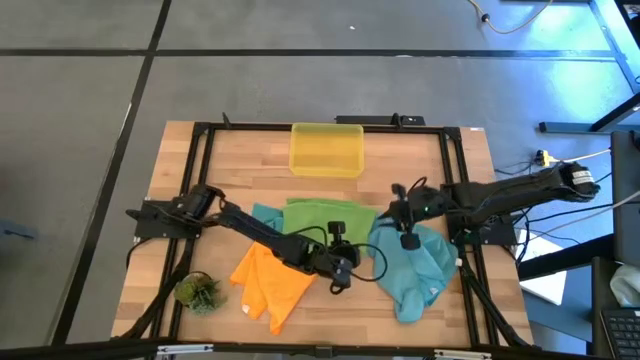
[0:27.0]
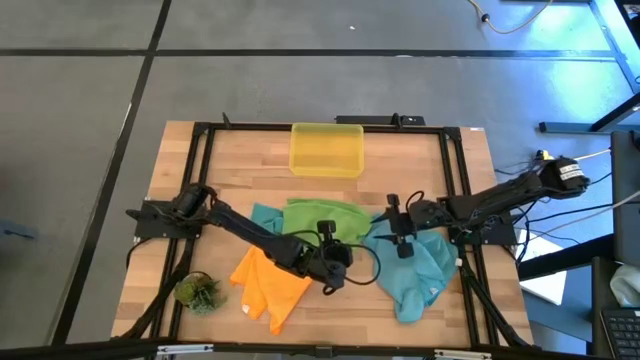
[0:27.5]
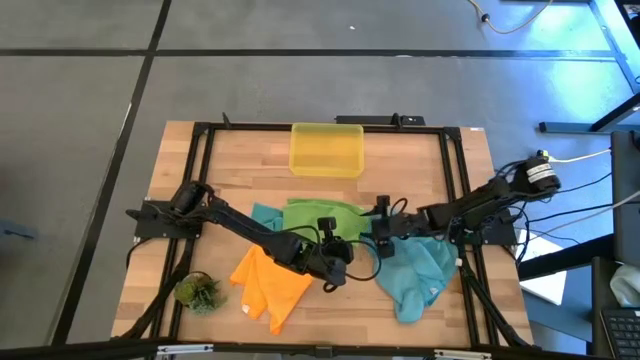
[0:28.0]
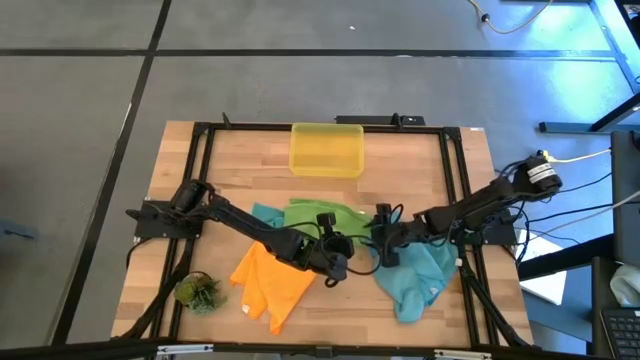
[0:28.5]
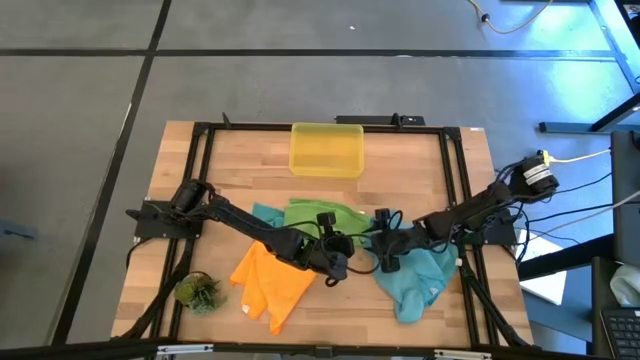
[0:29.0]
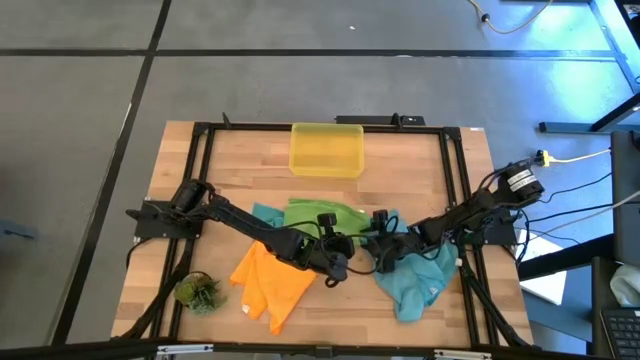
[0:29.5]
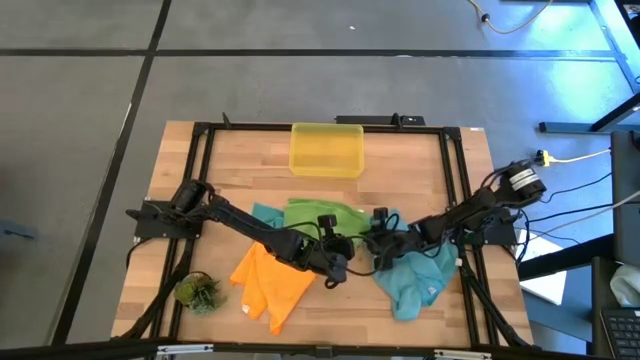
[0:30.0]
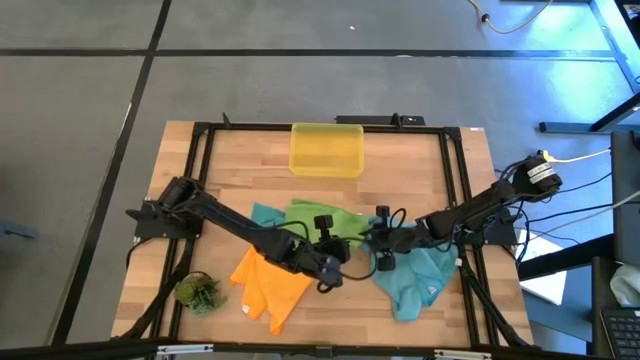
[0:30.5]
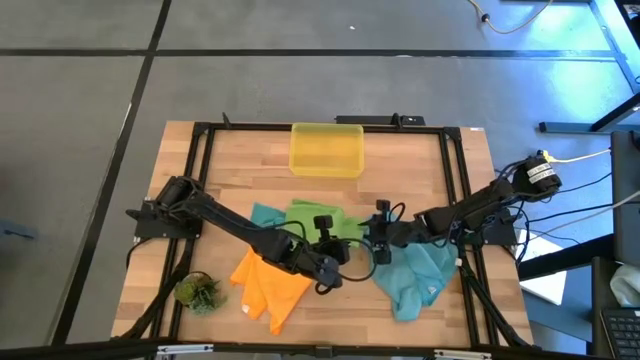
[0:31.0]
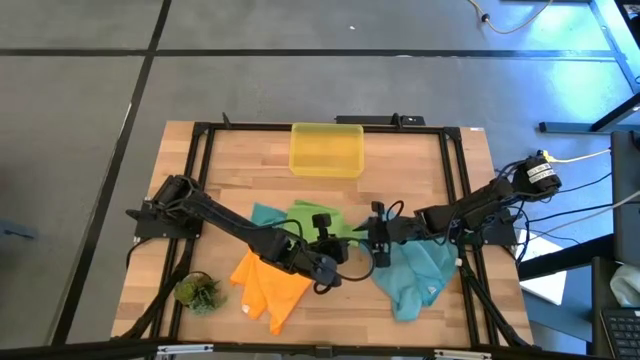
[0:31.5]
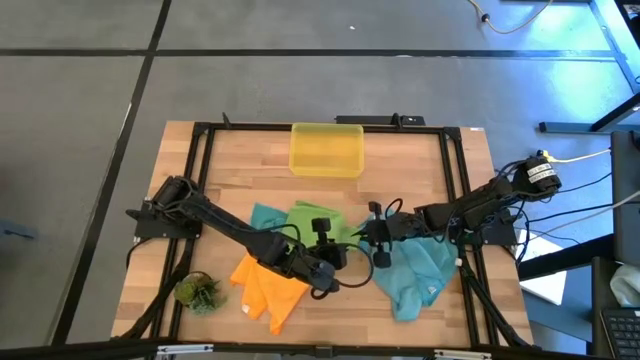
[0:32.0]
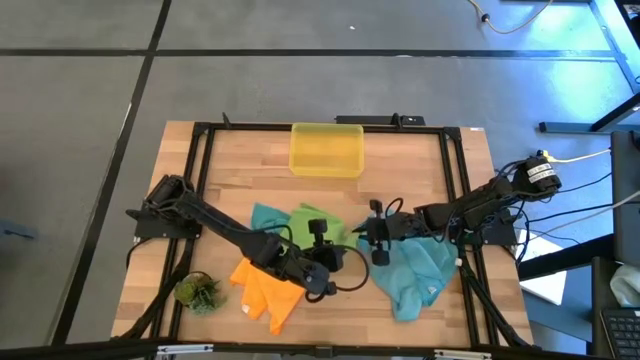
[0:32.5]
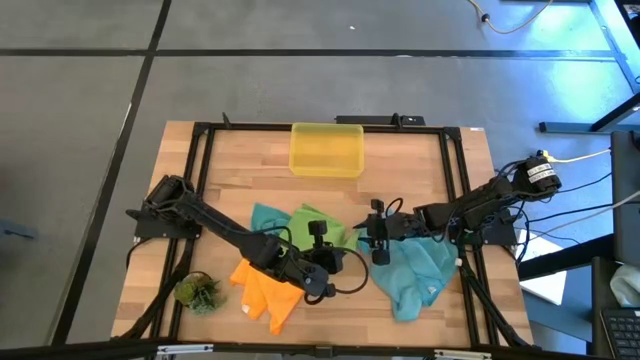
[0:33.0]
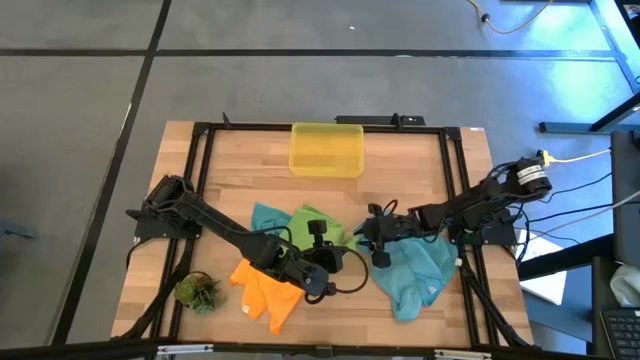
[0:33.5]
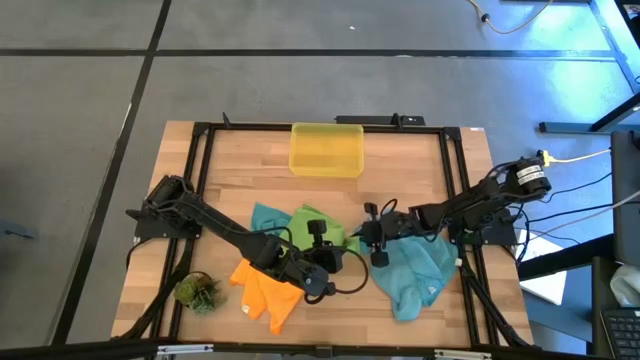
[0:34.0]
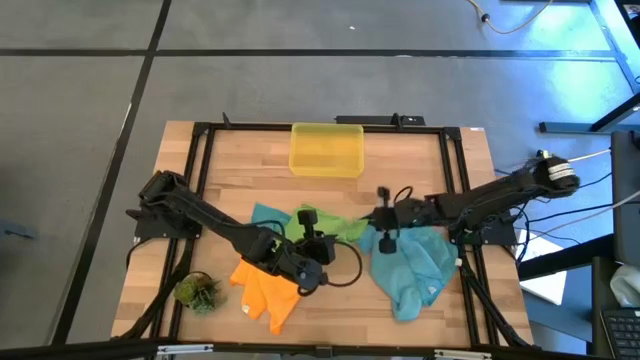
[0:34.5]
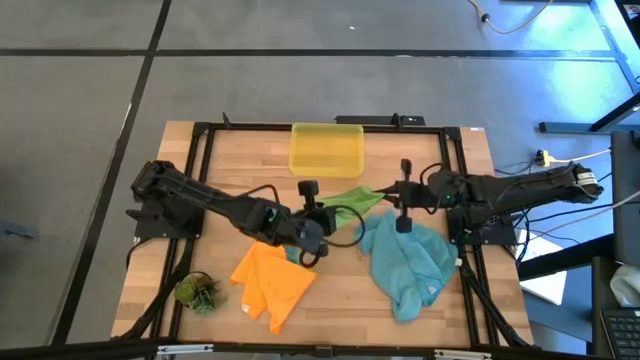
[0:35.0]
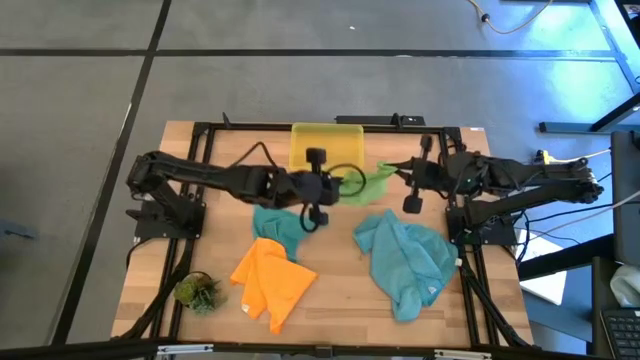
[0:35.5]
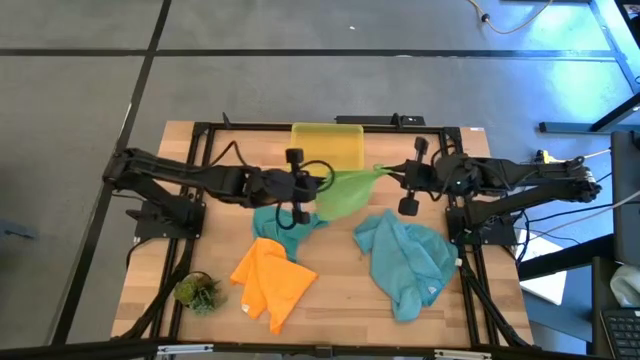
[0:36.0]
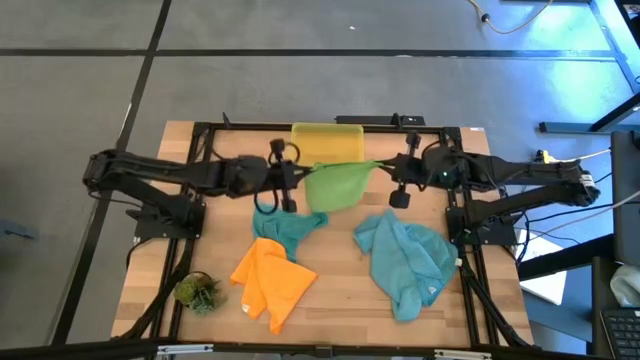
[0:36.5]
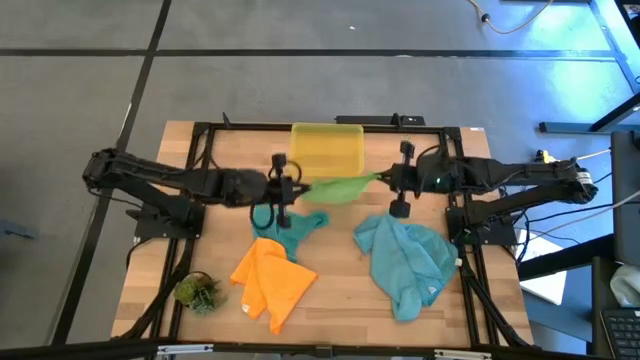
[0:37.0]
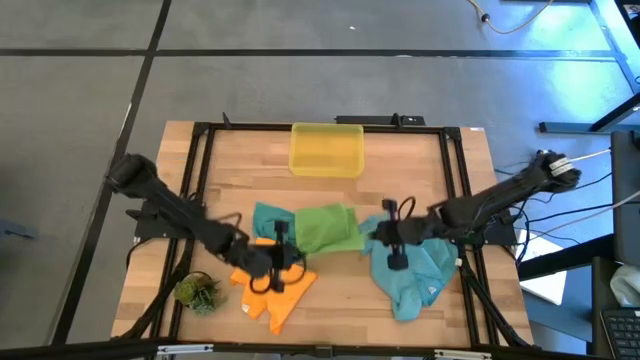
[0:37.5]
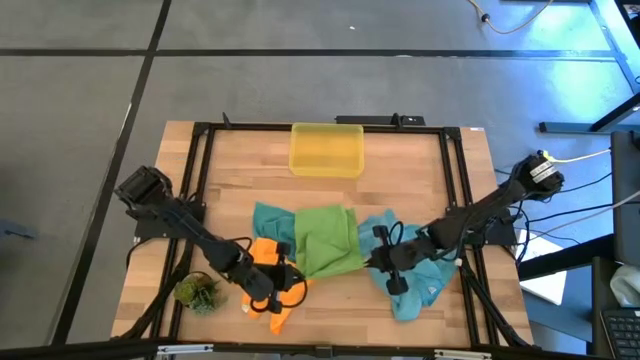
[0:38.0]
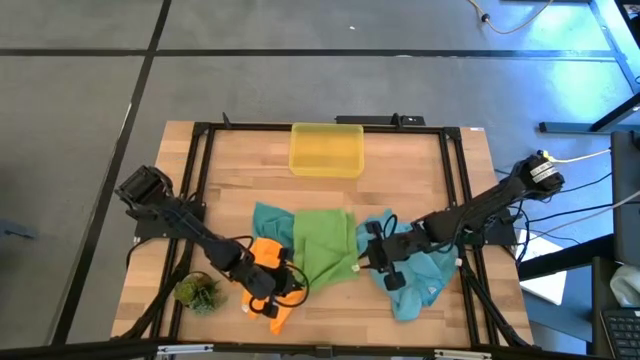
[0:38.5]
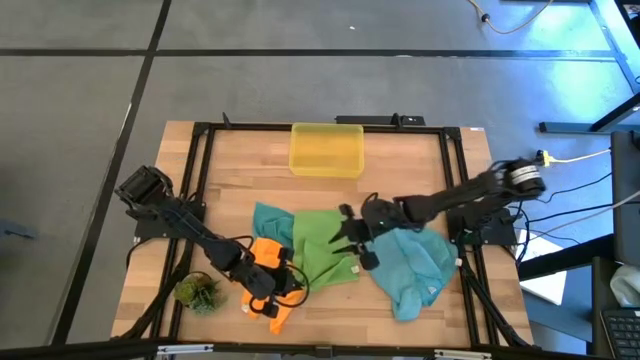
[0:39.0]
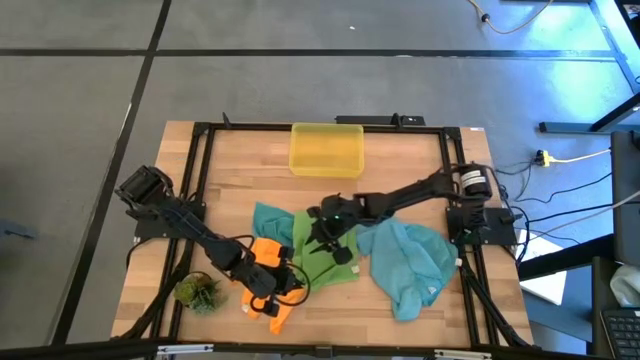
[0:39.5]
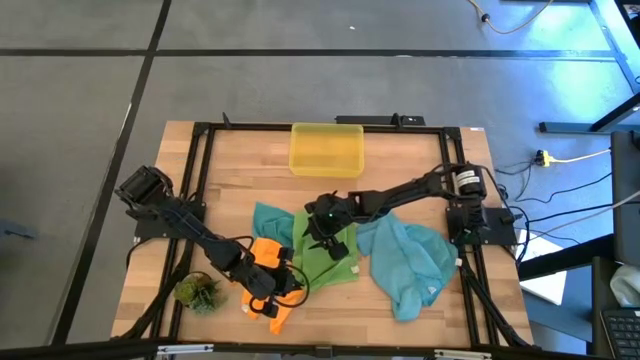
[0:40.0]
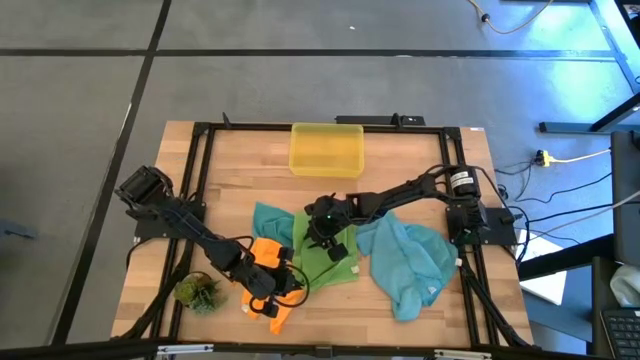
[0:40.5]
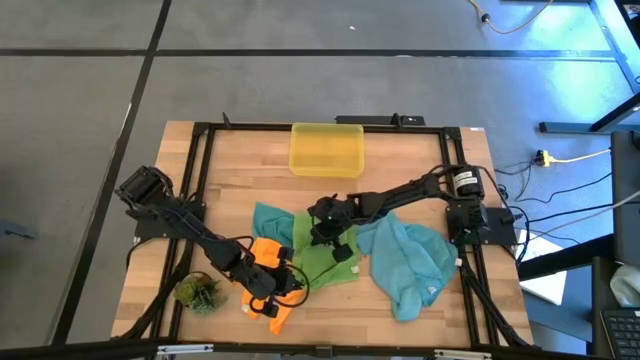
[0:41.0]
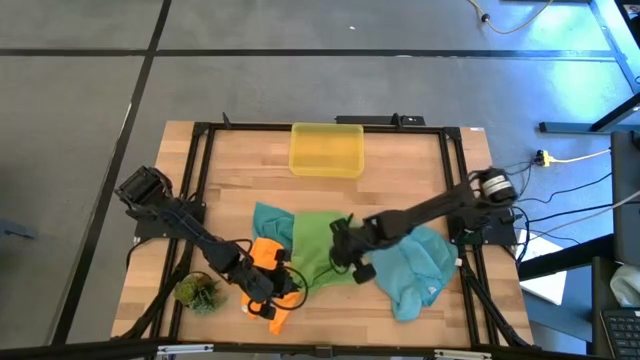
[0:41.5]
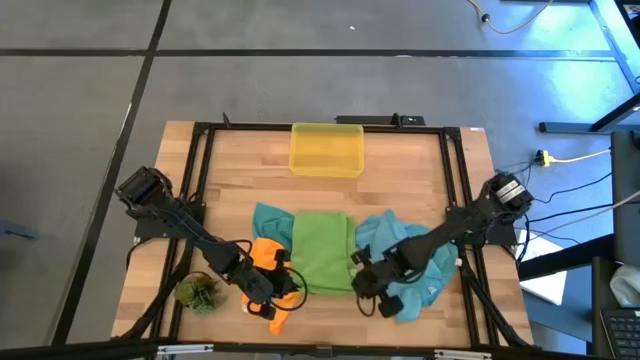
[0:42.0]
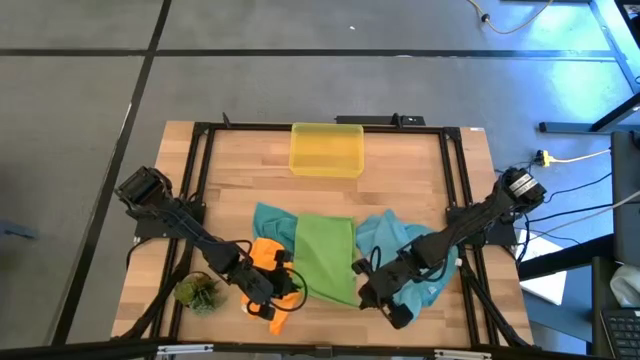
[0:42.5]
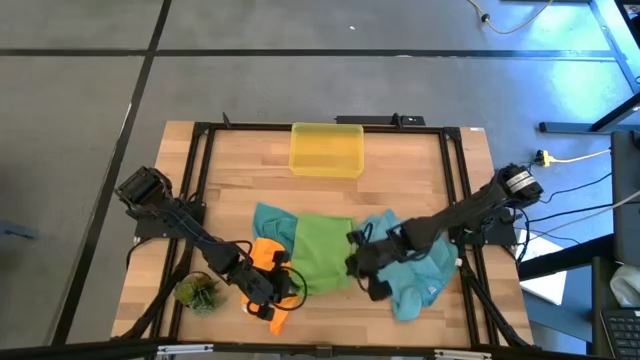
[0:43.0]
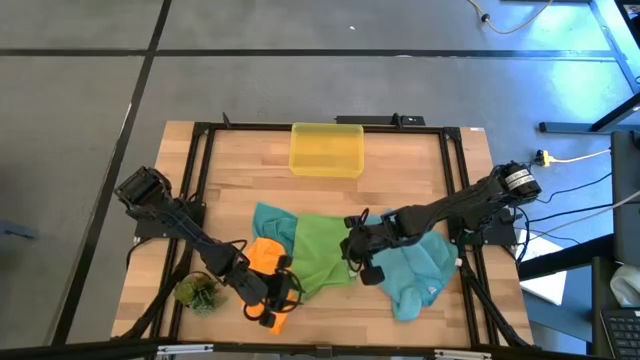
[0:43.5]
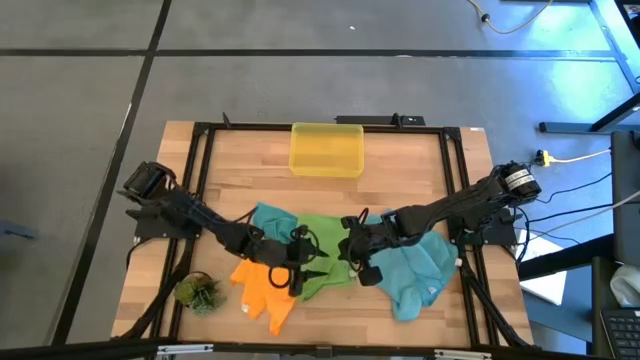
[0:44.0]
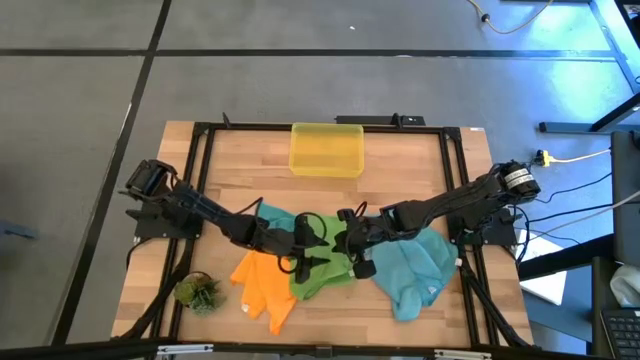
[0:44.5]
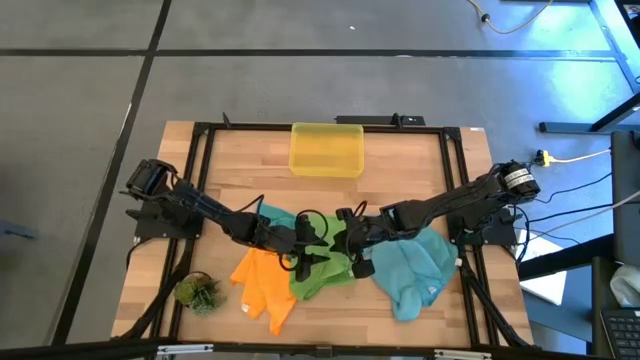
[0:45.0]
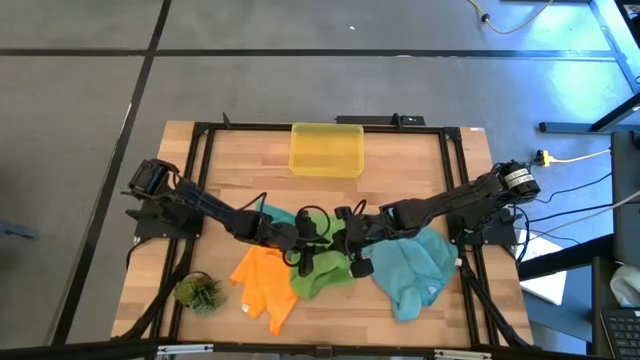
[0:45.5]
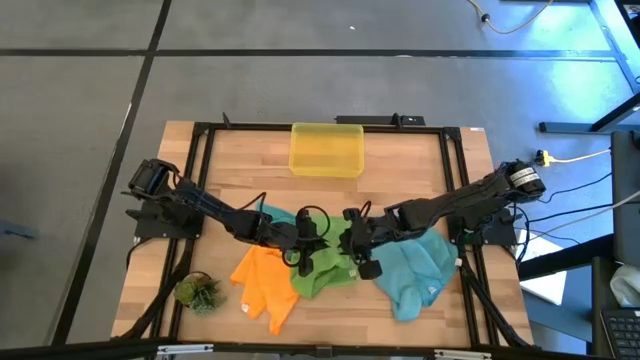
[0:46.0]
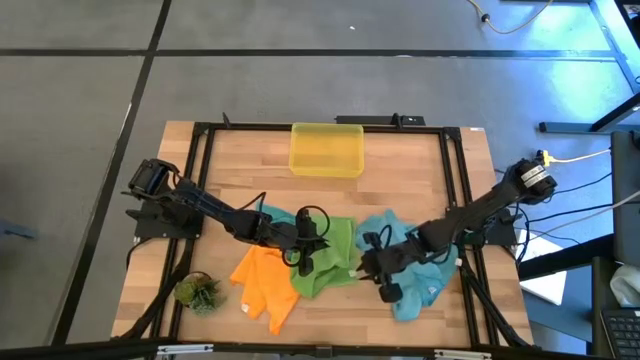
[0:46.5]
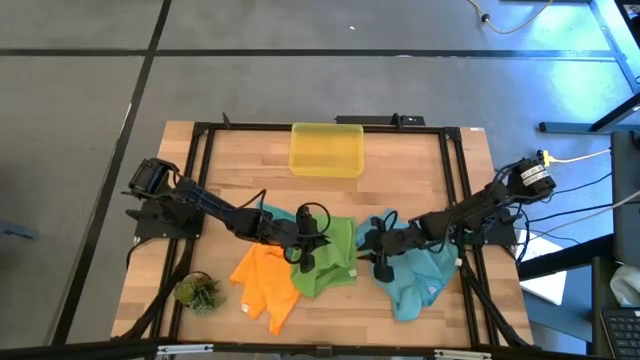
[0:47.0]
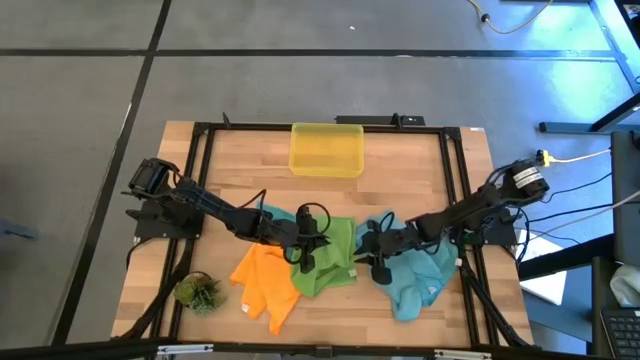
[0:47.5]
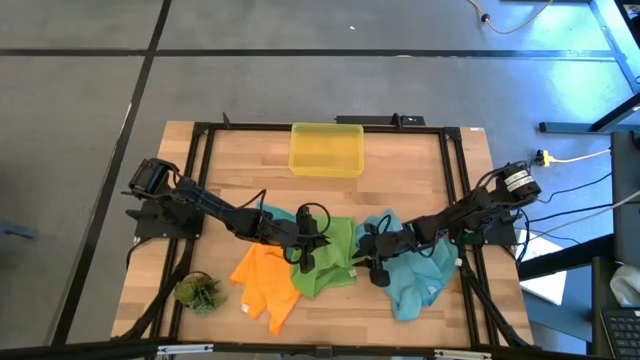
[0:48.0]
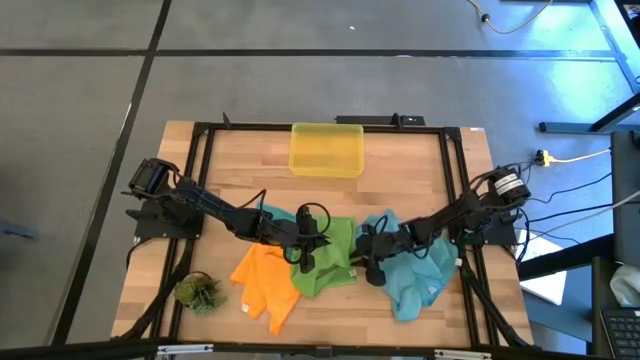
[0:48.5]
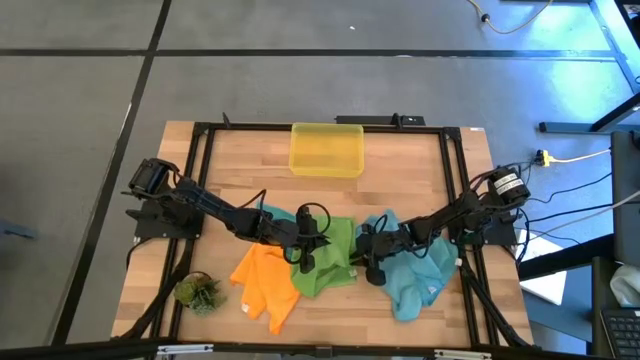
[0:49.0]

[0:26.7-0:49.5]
Task: Fold microfiber towels
Fold the green microfiber cloth
